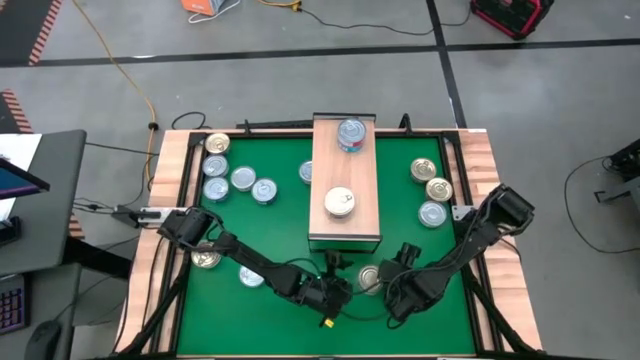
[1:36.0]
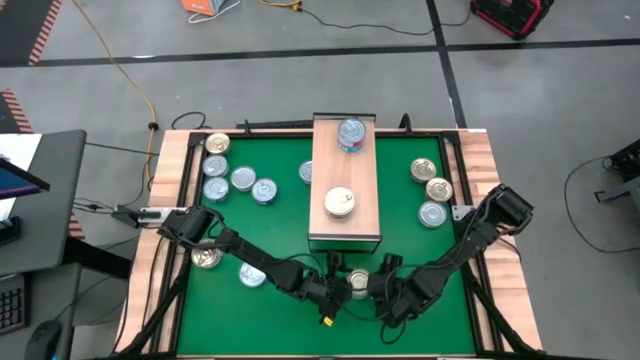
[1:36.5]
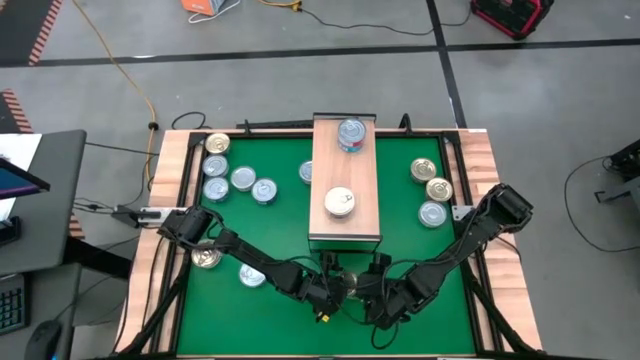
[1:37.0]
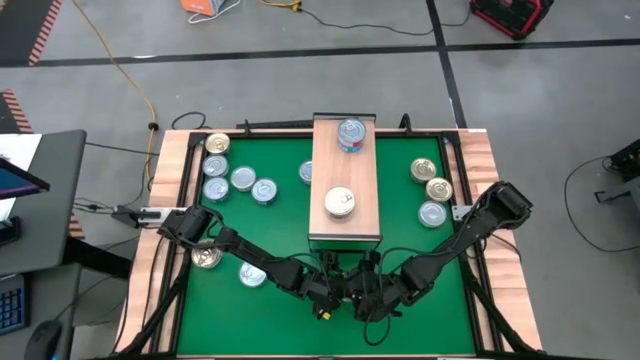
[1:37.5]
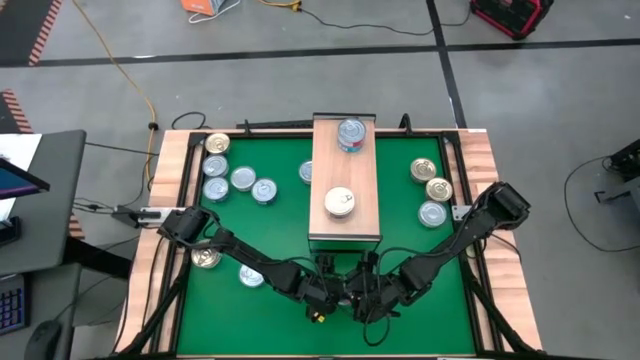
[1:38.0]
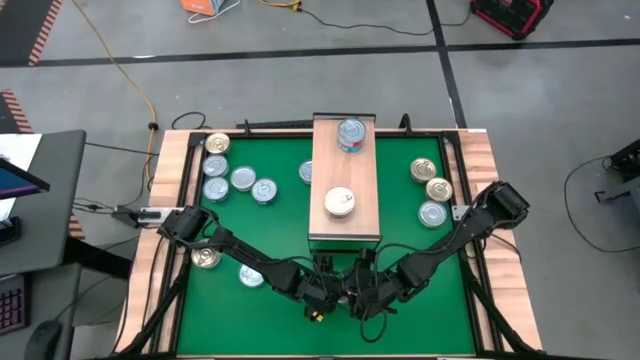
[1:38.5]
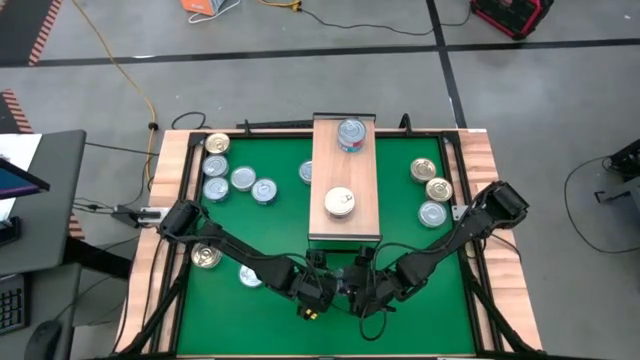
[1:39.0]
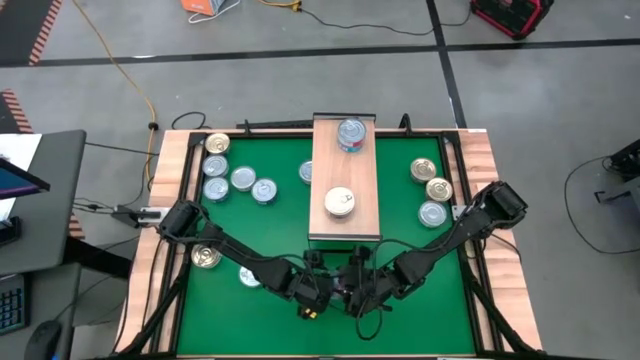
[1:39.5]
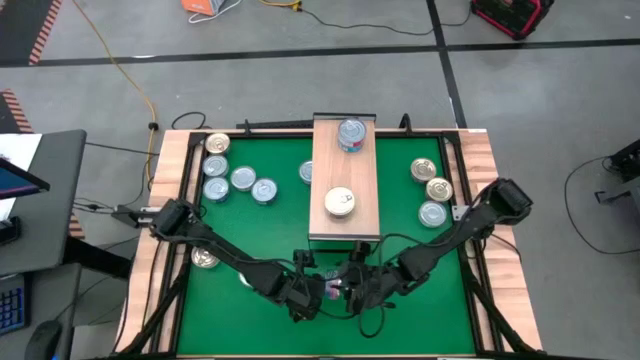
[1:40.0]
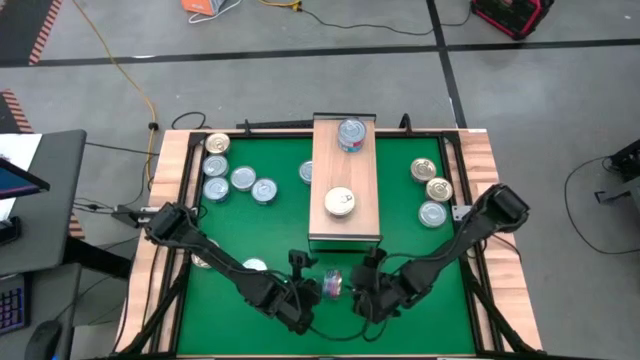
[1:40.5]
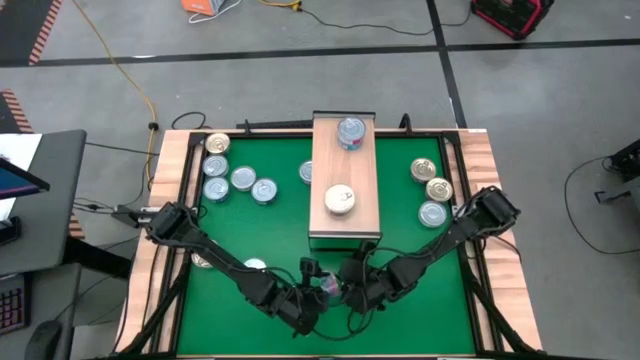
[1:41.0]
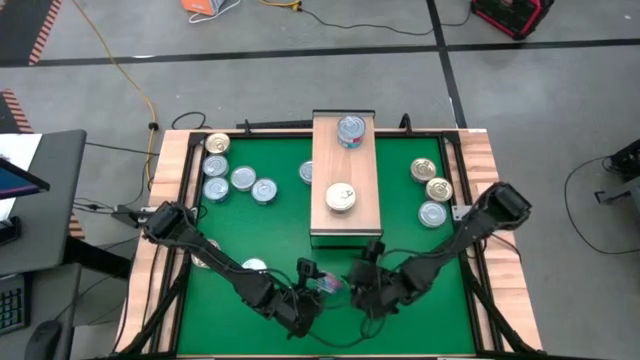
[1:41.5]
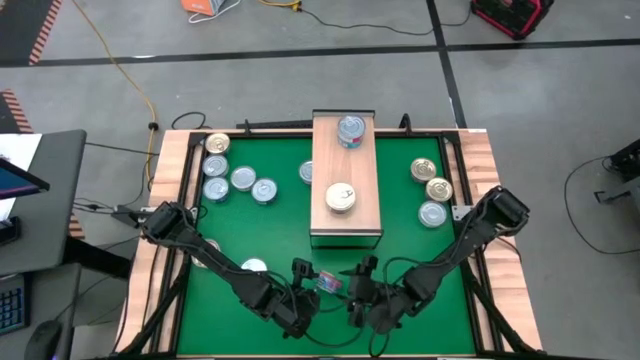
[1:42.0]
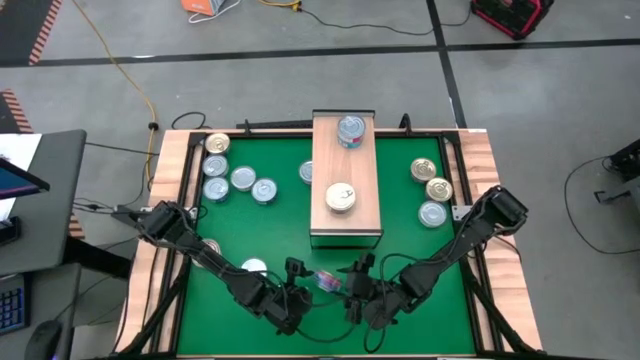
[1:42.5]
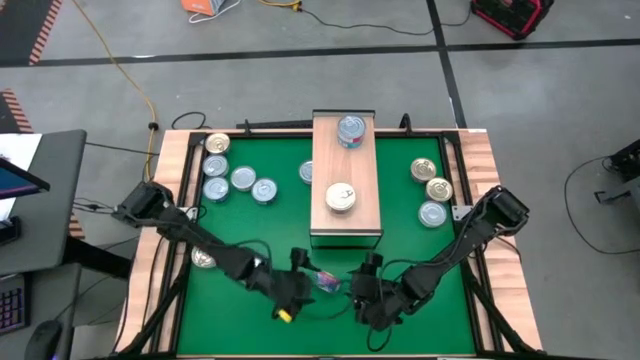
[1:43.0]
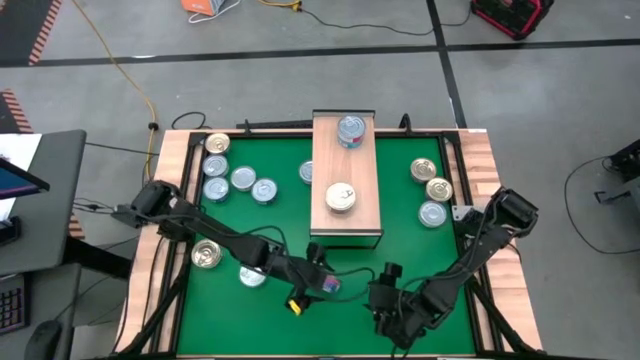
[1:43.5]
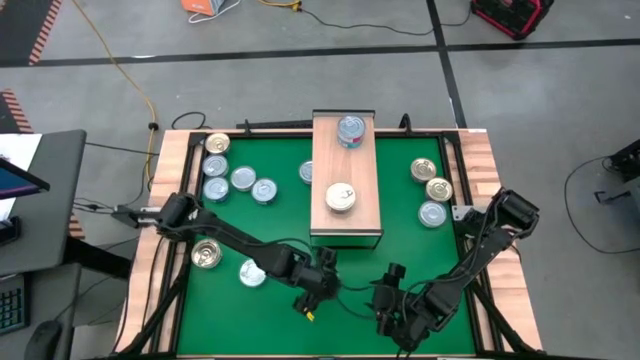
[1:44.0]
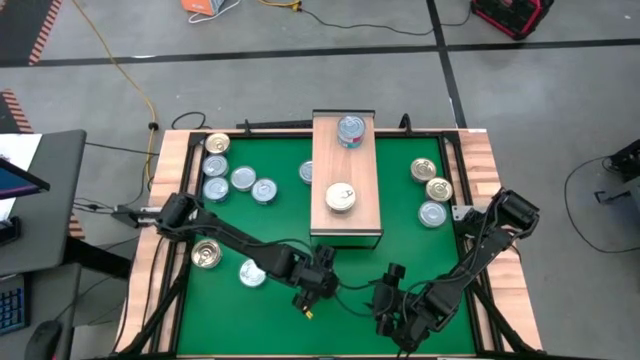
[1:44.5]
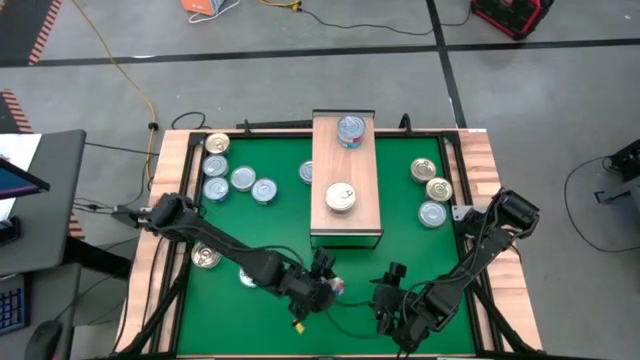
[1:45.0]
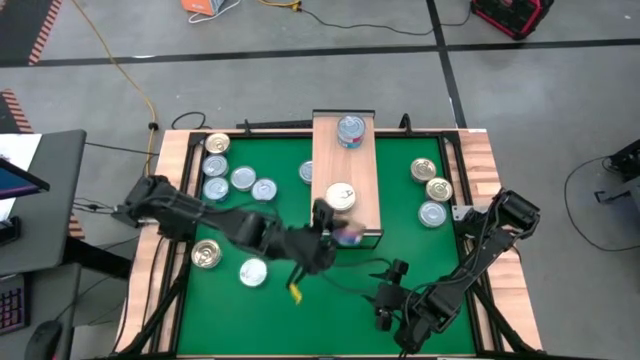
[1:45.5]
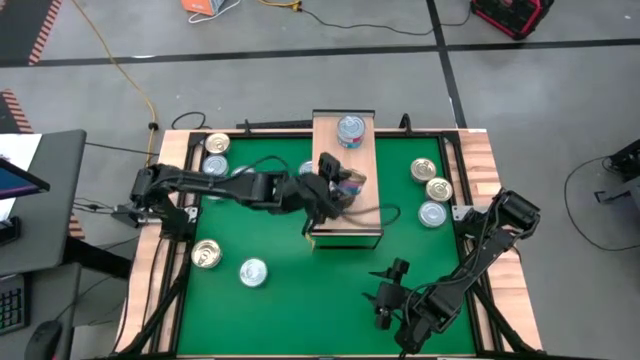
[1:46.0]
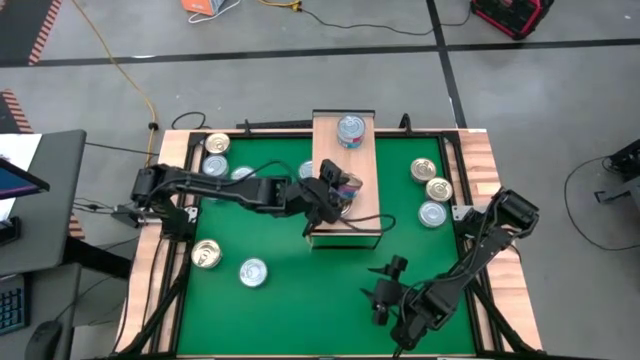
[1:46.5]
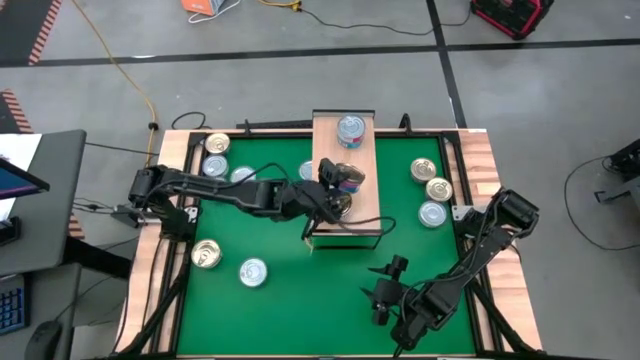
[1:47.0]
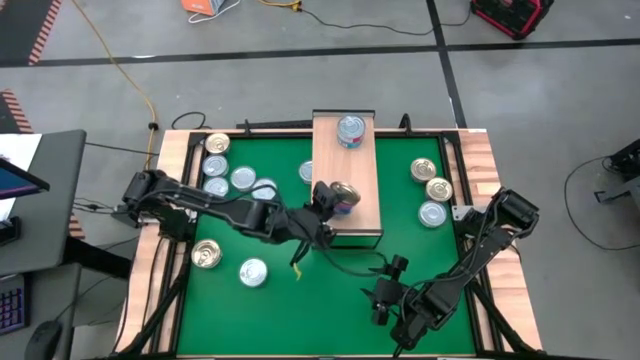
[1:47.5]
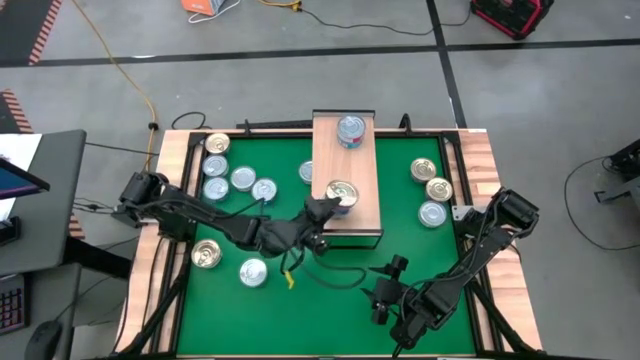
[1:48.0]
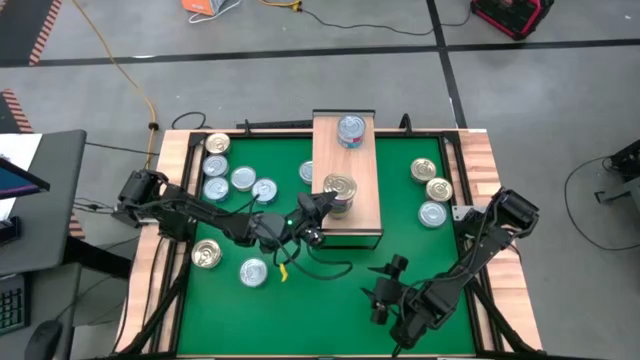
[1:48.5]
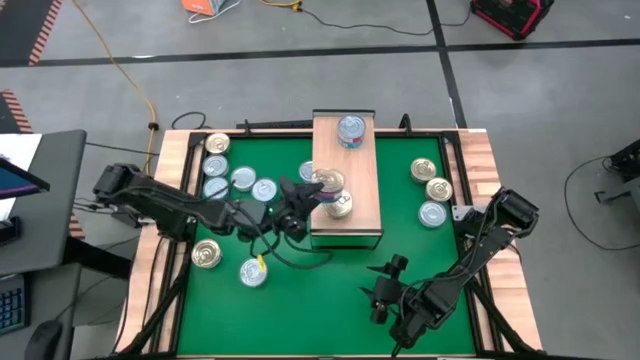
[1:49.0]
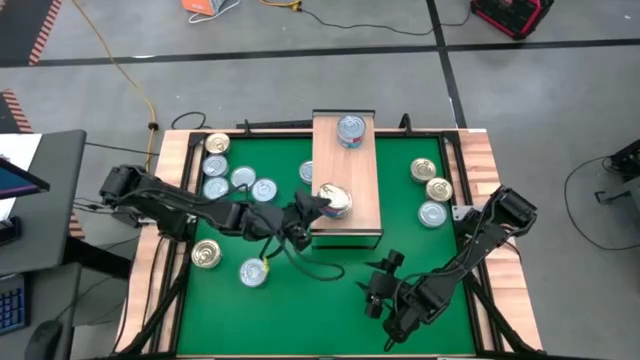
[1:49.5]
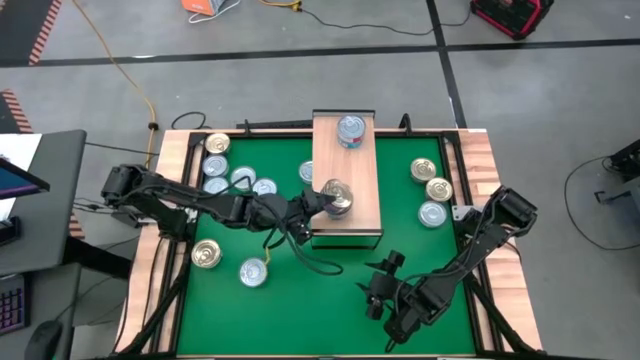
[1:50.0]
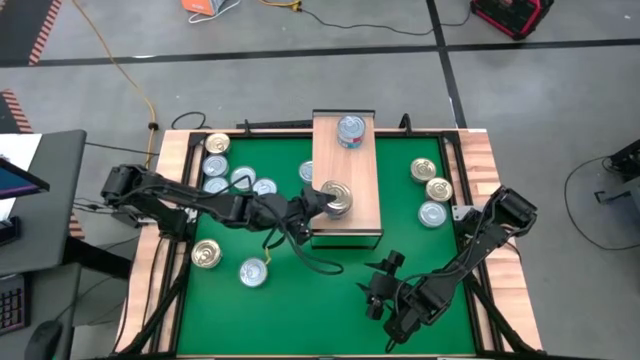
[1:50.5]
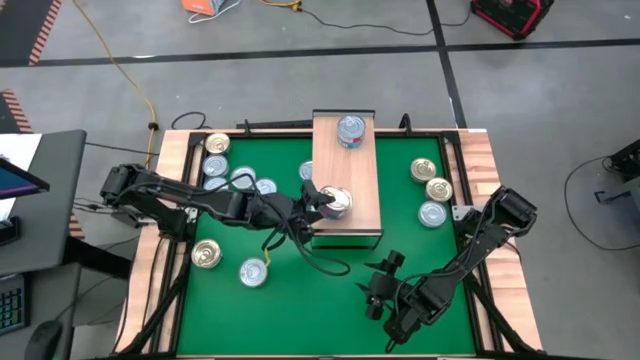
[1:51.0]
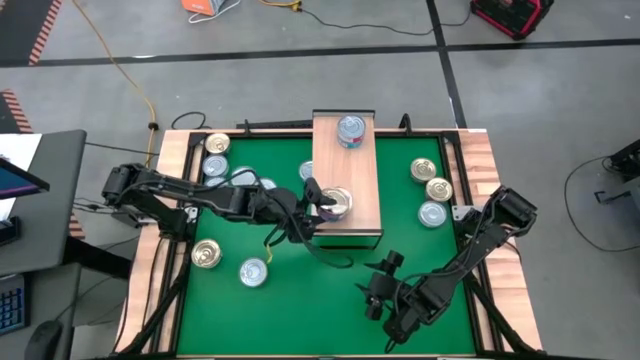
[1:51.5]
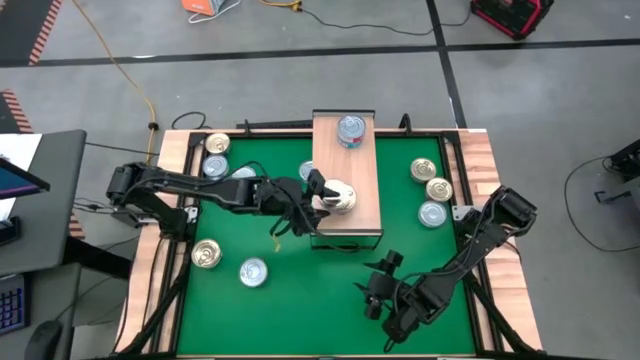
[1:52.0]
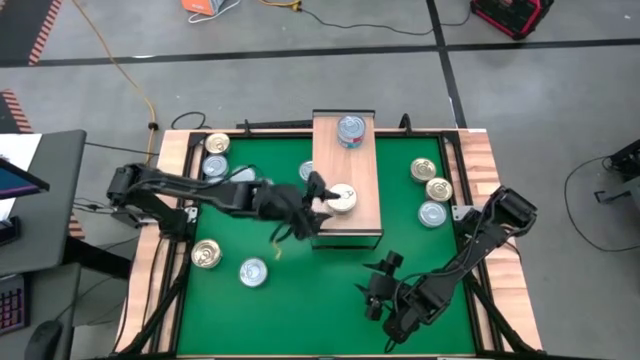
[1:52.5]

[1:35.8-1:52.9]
Task: Stack canned seafood by type on shelf
Stack the blue tuna can on top of the blue tuna can on the shelf

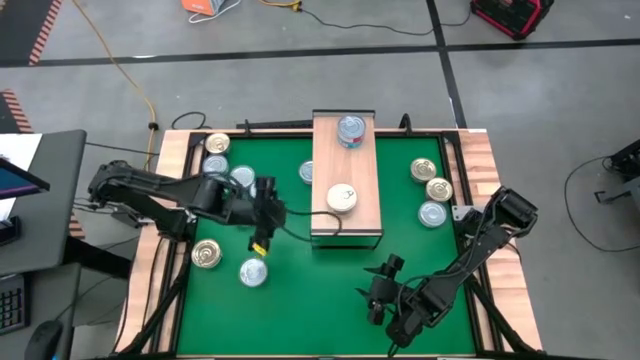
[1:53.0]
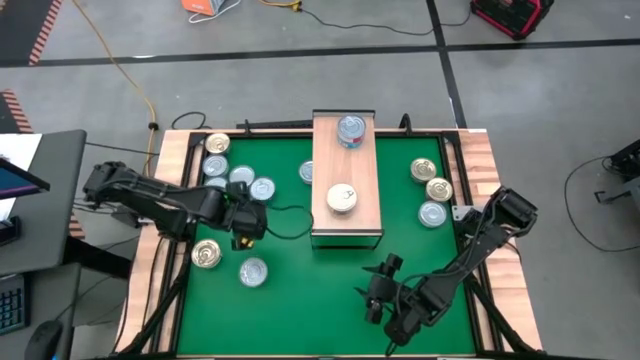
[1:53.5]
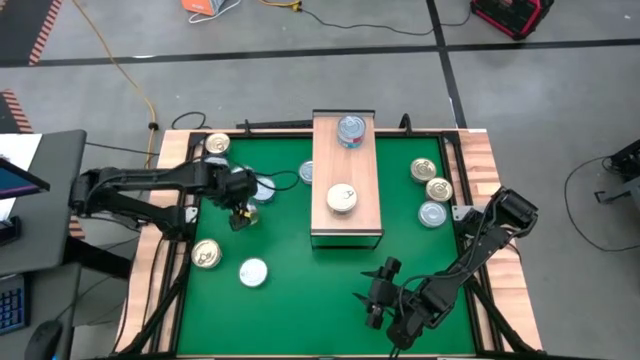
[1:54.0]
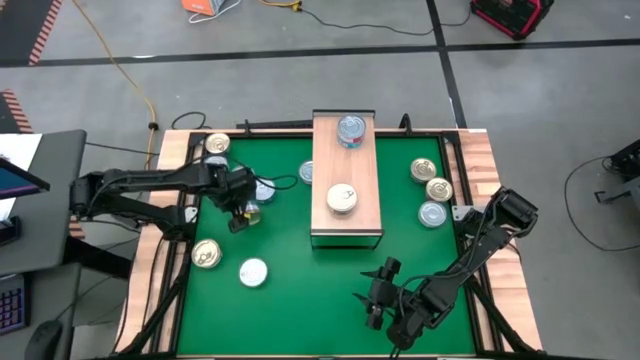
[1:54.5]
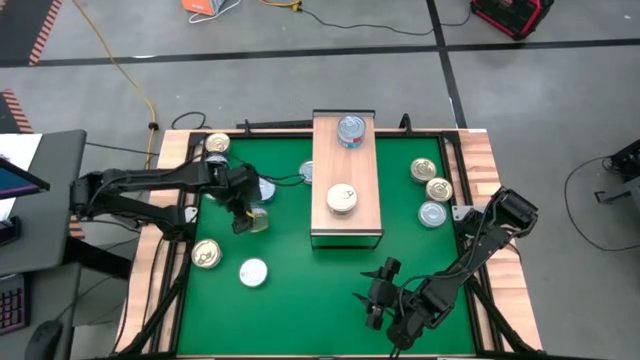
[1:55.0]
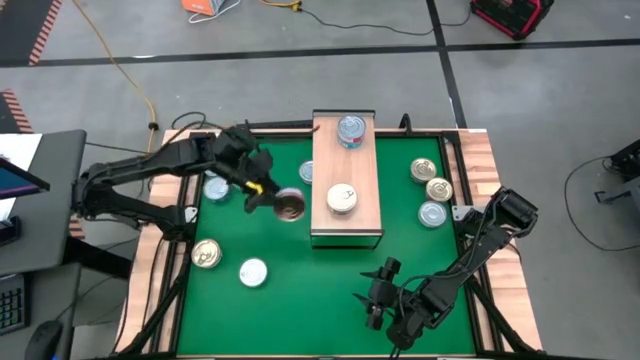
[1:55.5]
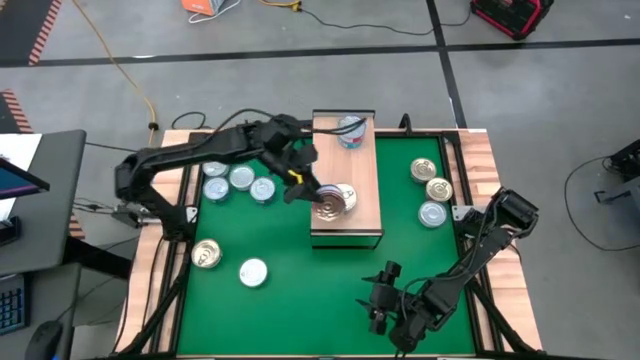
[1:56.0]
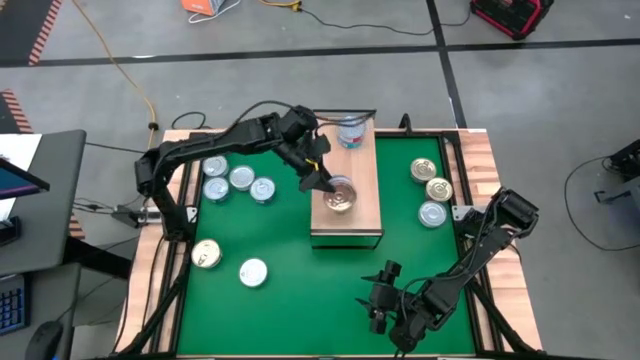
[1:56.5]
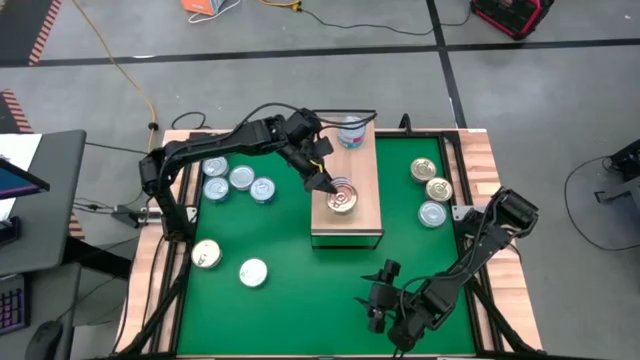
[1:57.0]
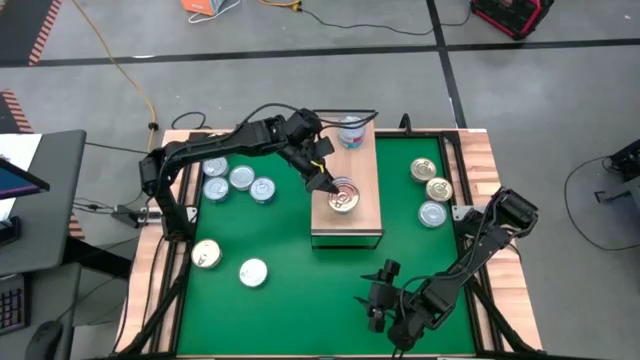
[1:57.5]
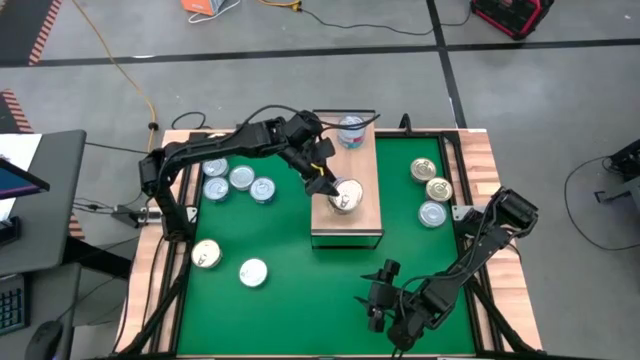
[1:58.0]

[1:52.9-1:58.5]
Stack the blue tuna can on top of the blue tuna can on the shelf
